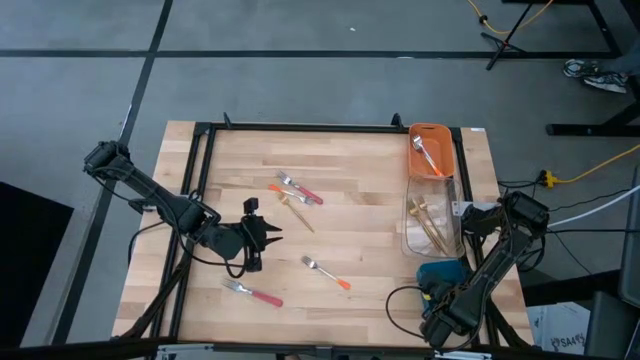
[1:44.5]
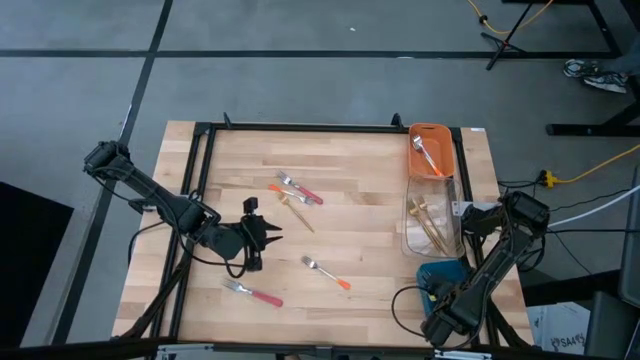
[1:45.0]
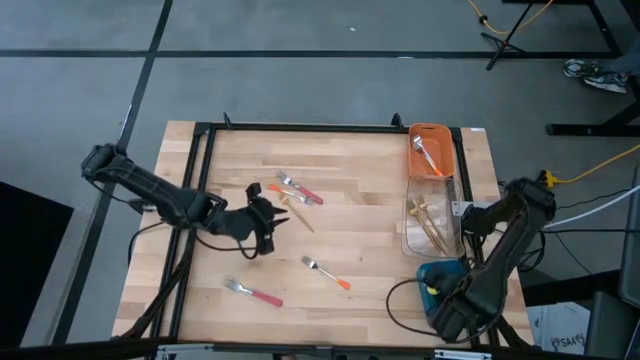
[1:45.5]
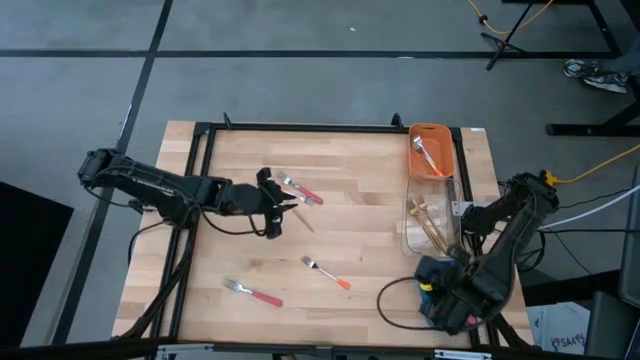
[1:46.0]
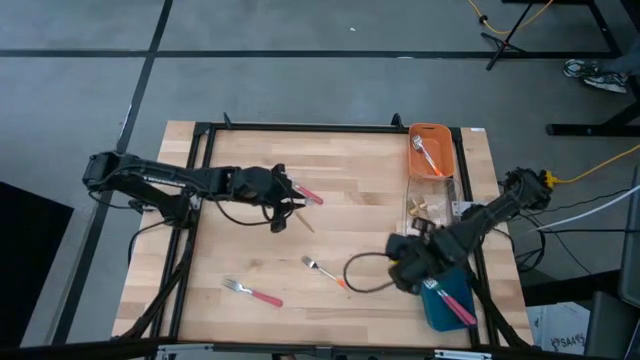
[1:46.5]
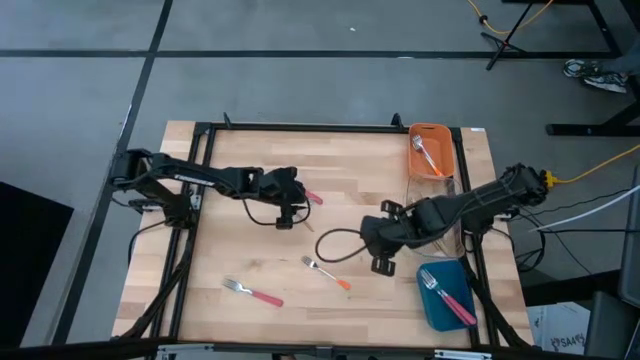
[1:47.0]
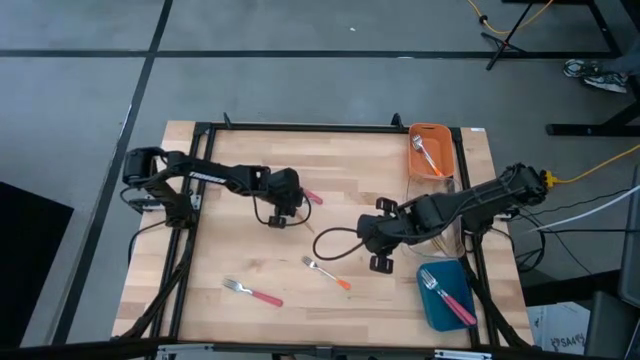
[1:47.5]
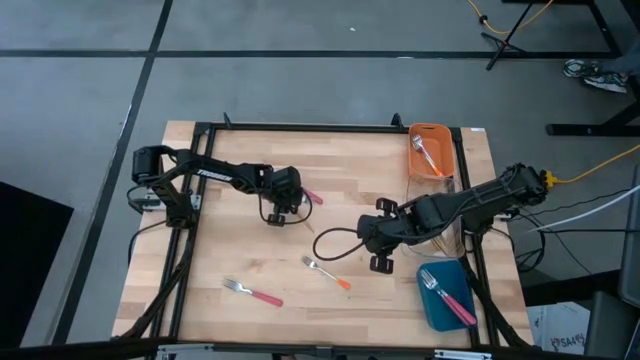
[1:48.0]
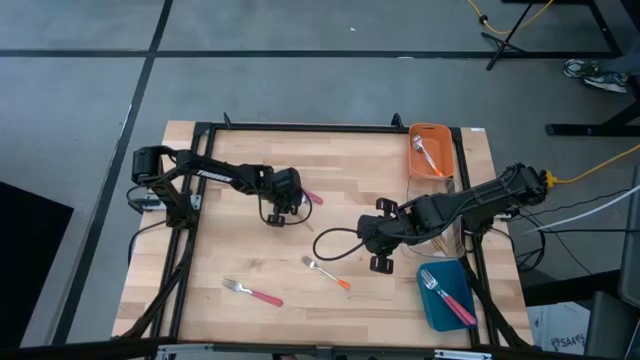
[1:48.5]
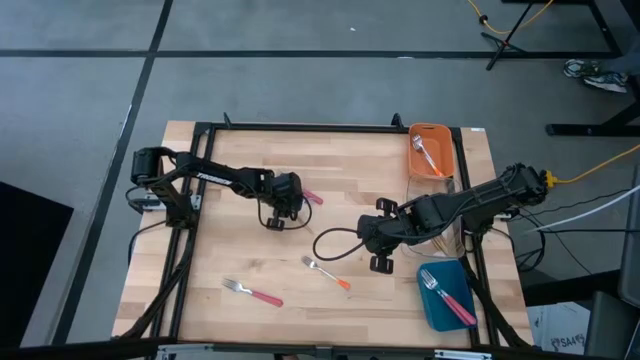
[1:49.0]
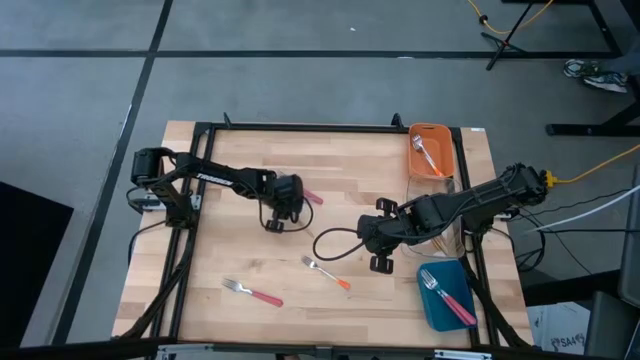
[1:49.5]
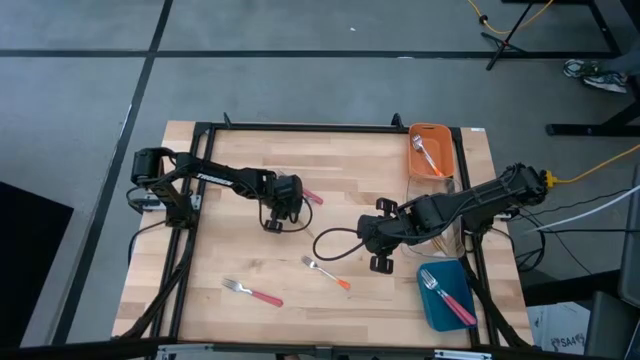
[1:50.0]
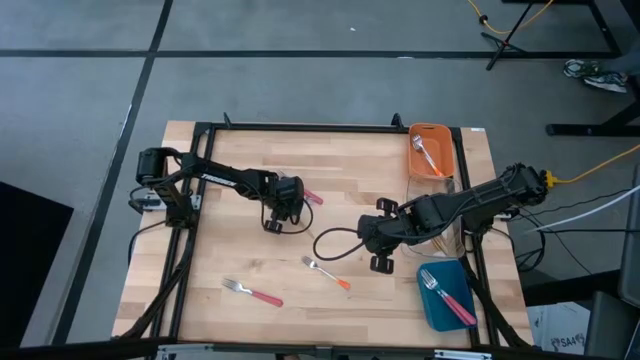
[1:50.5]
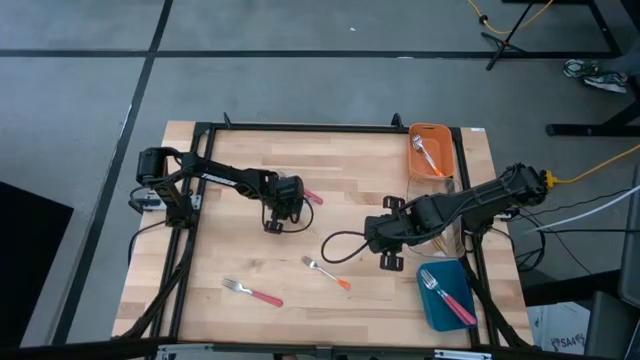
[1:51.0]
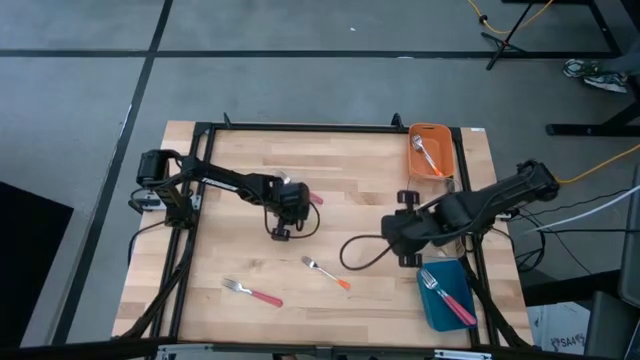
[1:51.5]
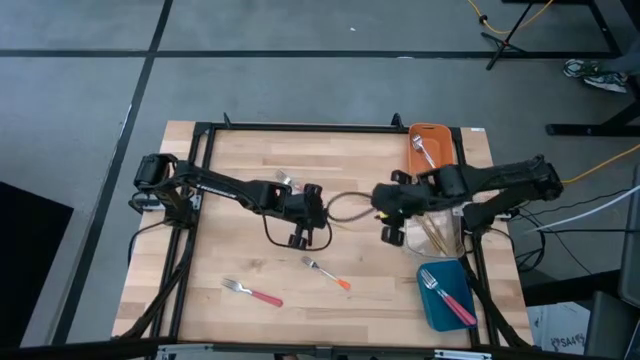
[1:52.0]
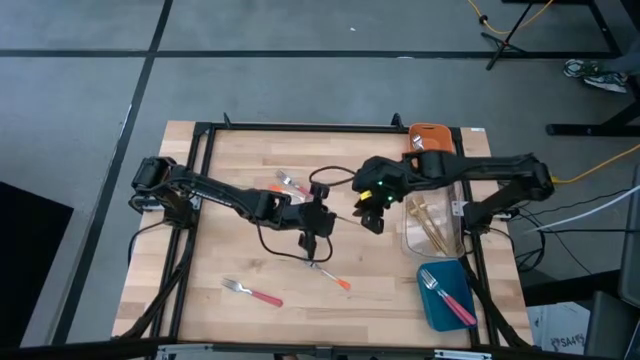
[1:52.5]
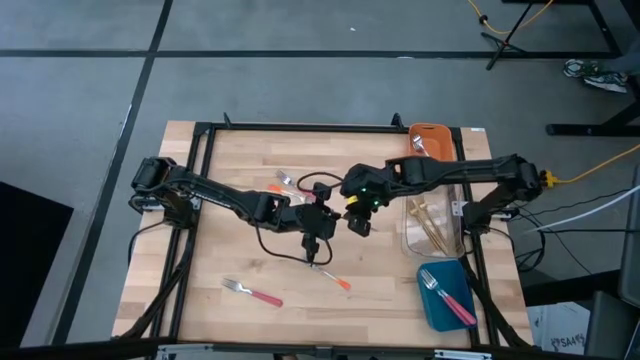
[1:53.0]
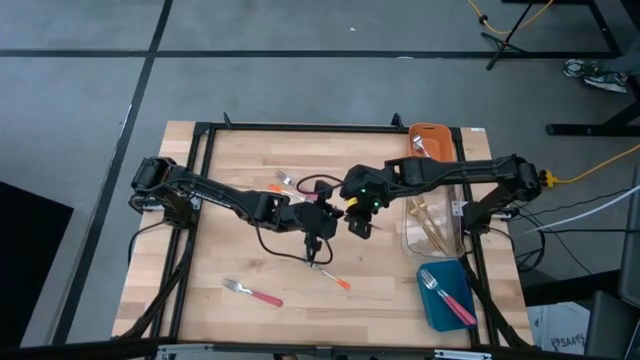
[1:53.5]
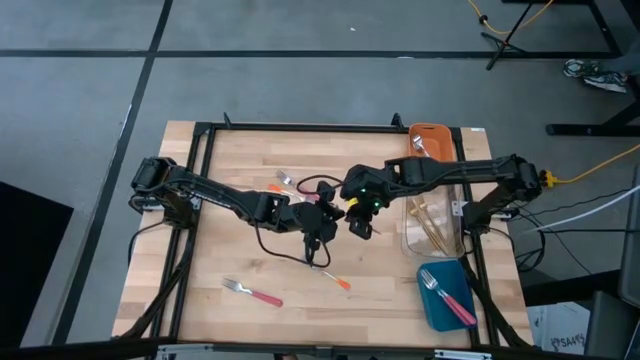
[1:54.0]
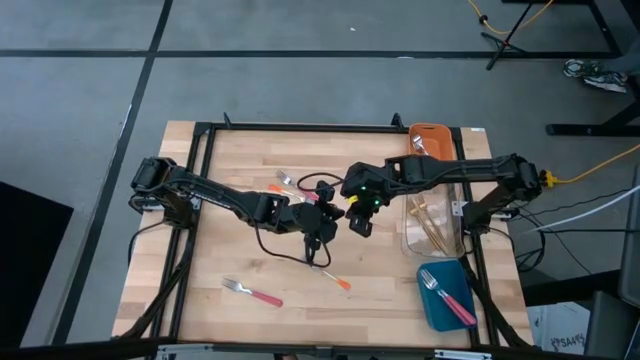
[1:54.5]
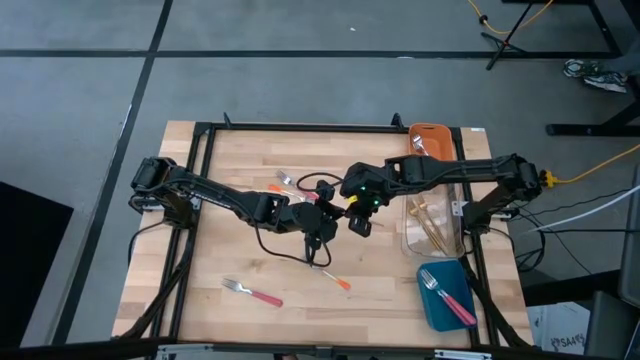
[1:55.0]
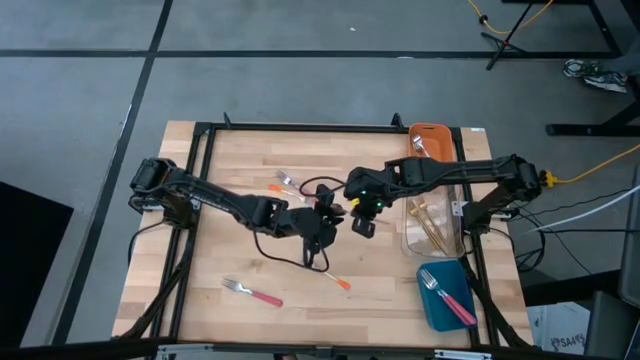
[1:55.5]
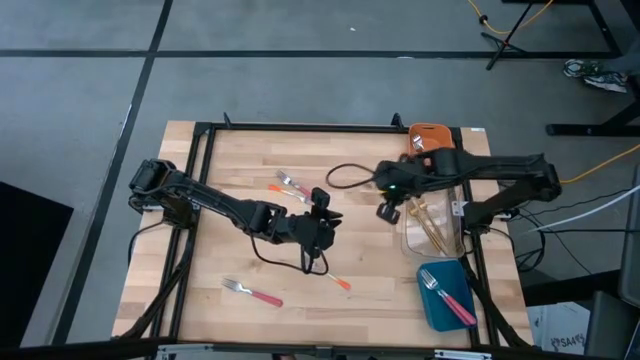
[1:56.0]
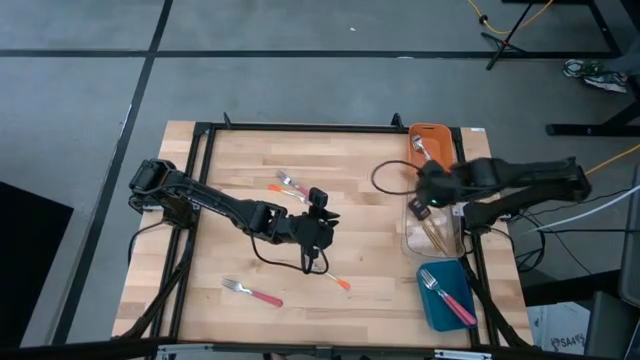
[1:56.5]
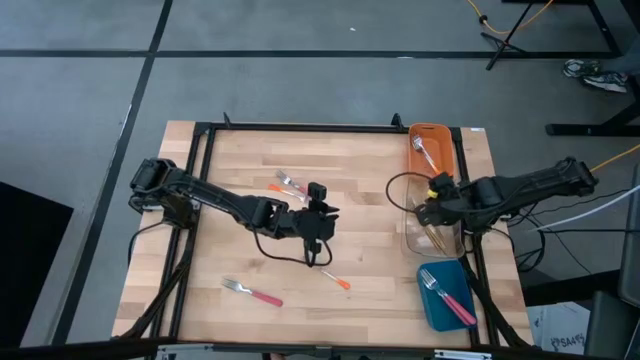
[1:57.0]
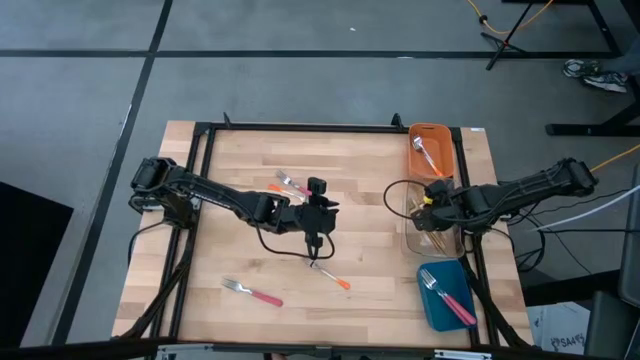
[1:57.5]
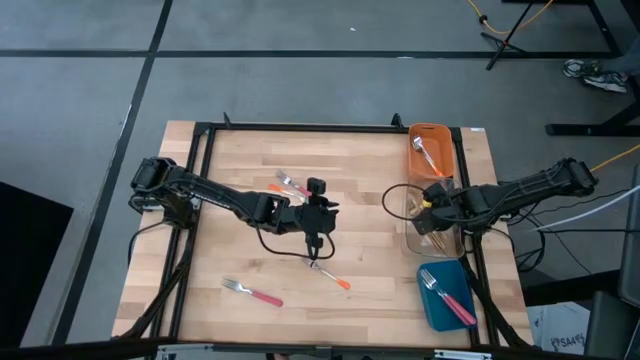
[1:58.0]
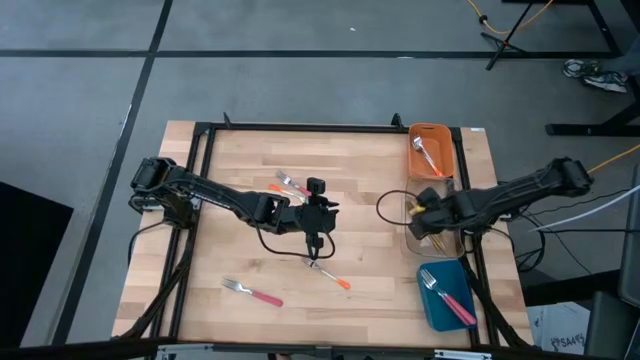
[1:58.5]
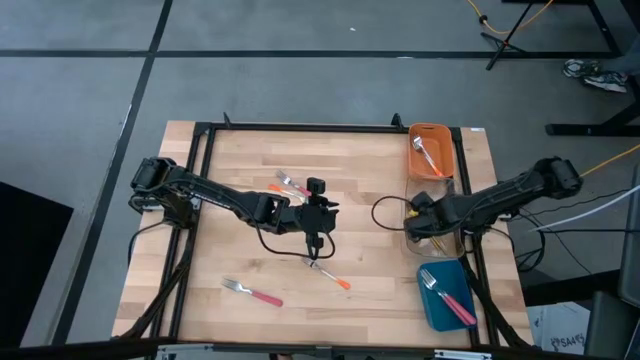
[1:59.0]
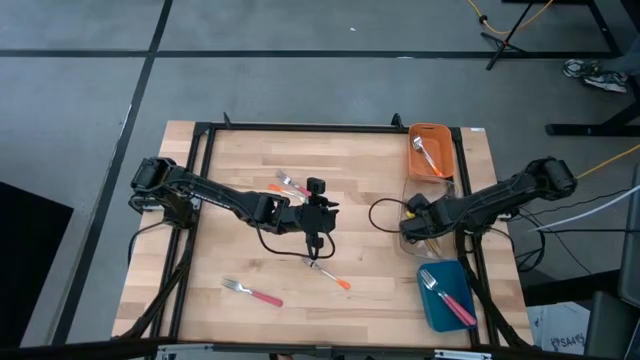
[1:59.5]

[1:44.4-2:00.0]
Task: Sort silverware by color (type)
Put the gold fork into the transparent bin

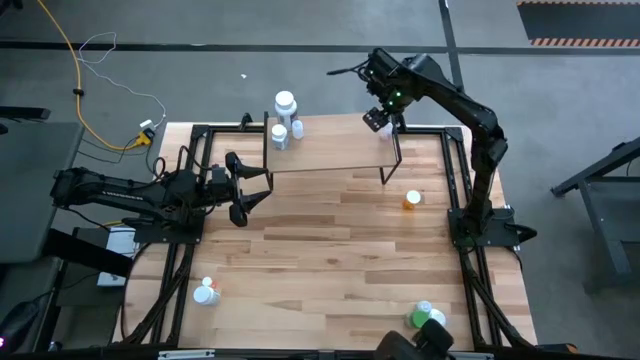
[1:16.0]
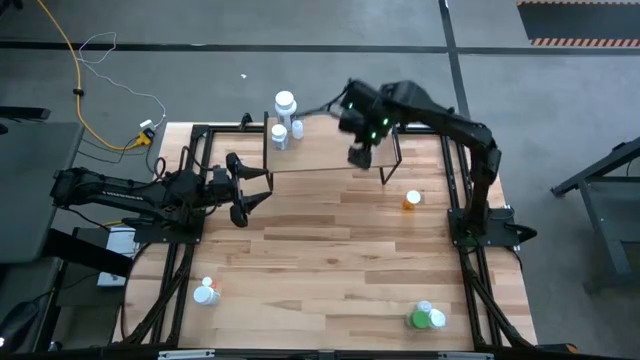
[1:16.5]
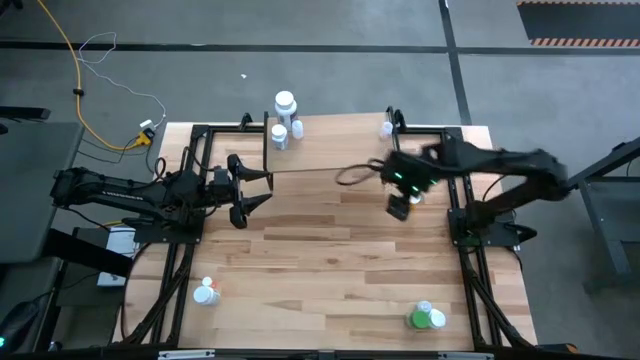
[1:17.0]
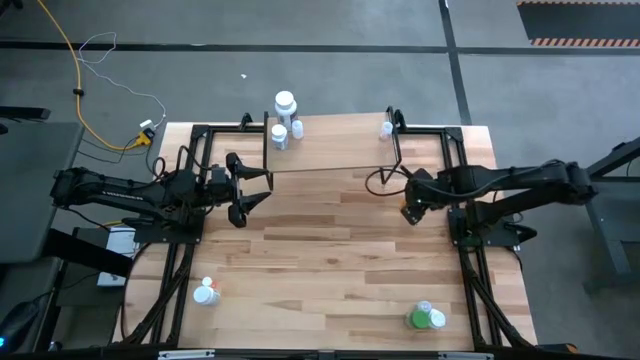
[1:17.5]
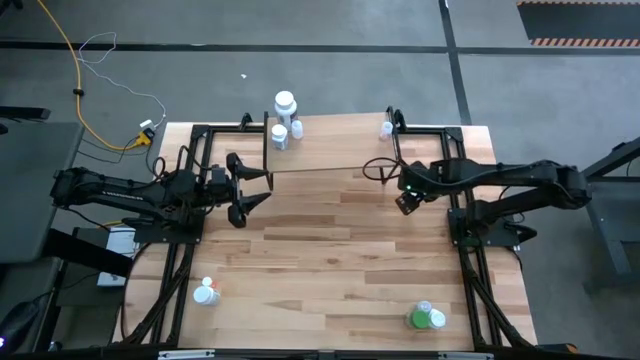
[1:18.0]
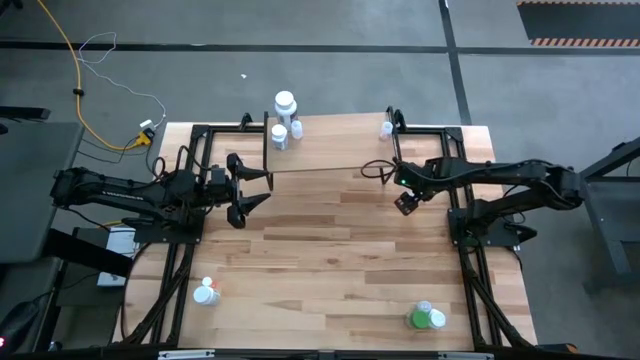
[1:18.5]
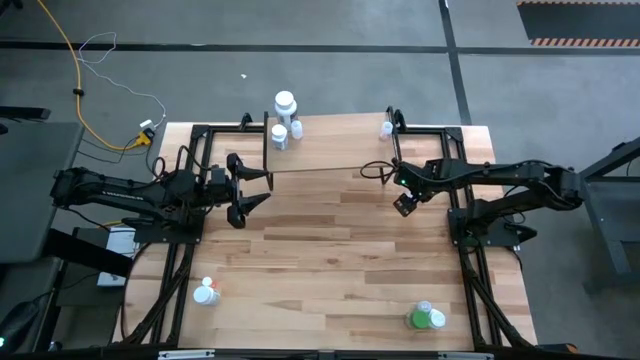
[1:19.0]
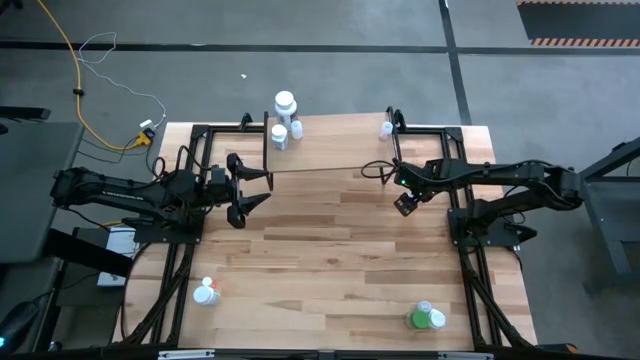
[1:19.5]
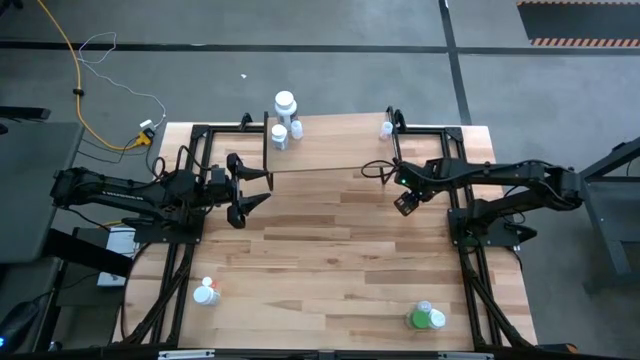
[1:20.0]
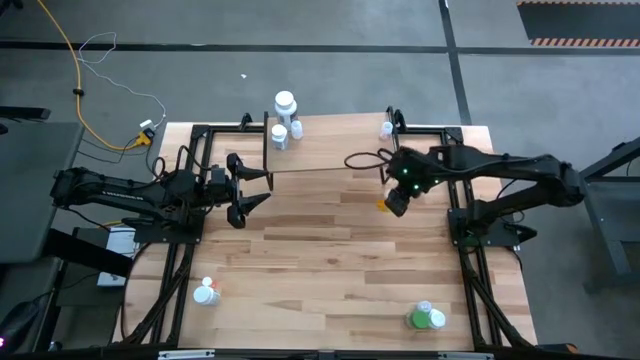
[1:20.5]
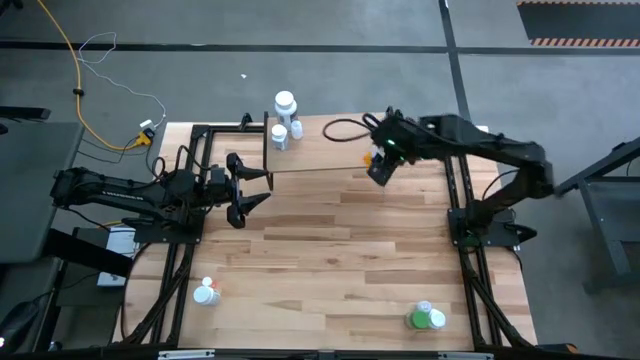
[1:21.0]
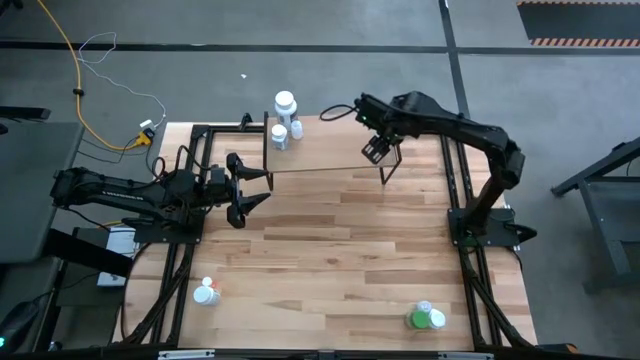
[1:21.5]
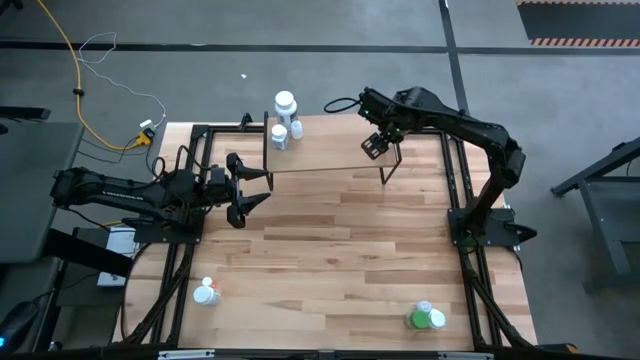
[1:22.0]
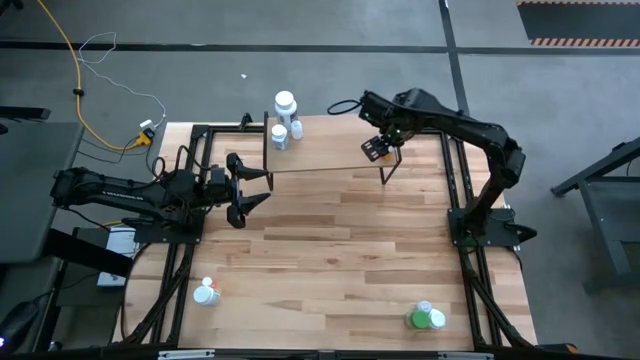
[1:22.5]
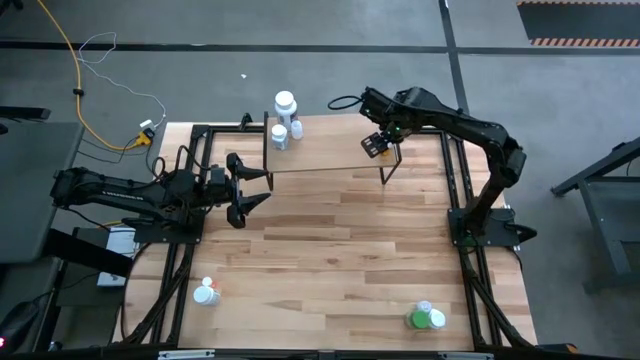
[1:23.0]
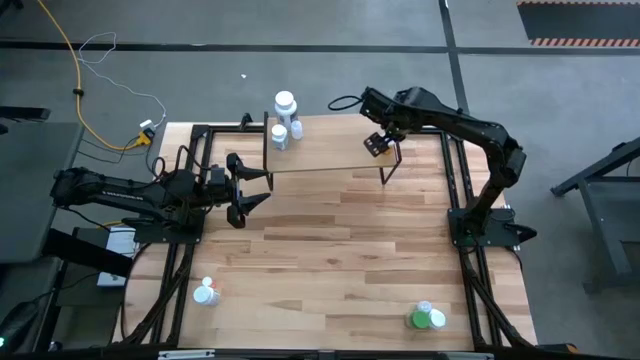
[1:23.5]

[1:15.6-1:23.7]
Task: Pick and place medicine bottles onto shelf by color
Put the orange pill bottle on the shelf
